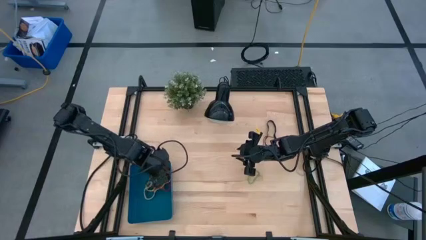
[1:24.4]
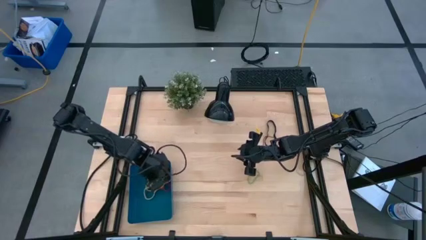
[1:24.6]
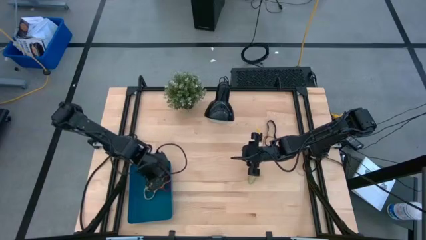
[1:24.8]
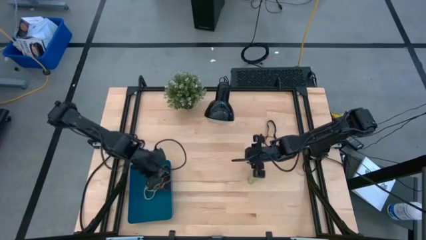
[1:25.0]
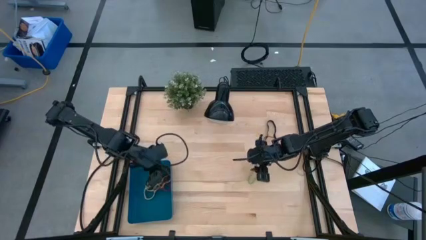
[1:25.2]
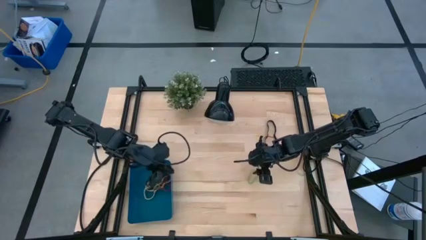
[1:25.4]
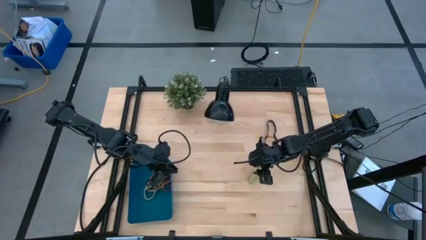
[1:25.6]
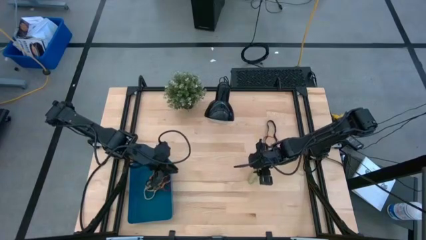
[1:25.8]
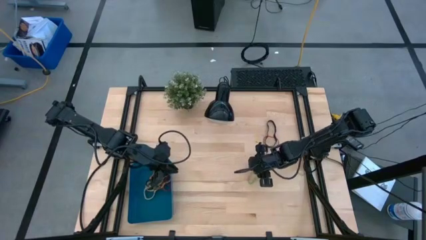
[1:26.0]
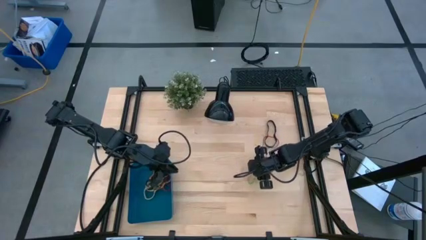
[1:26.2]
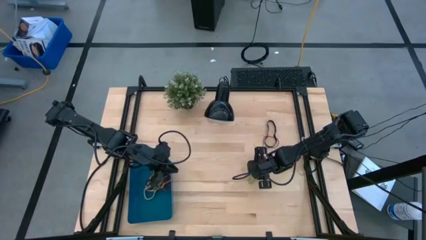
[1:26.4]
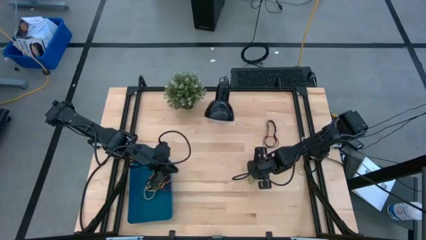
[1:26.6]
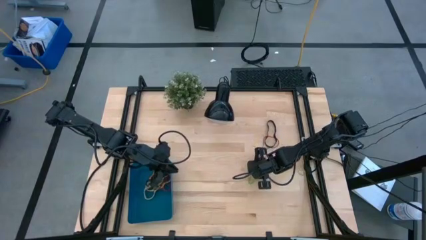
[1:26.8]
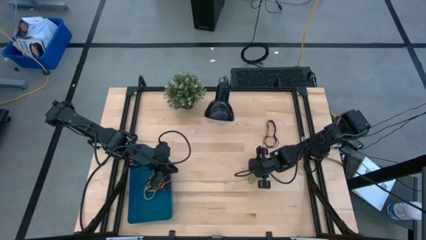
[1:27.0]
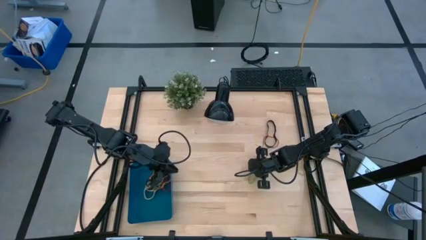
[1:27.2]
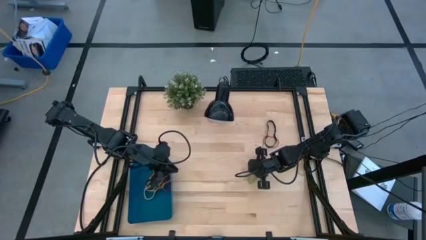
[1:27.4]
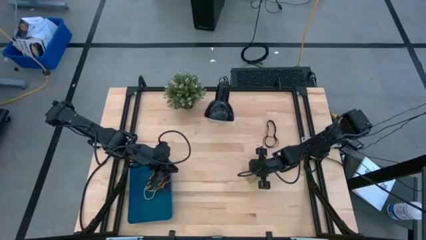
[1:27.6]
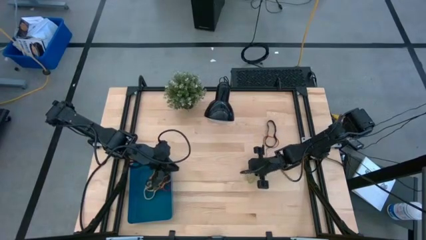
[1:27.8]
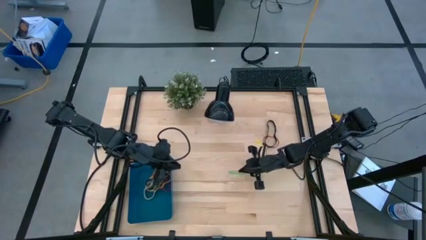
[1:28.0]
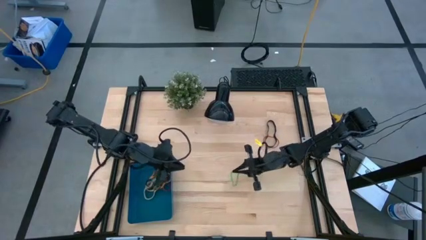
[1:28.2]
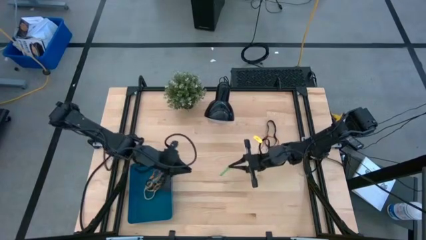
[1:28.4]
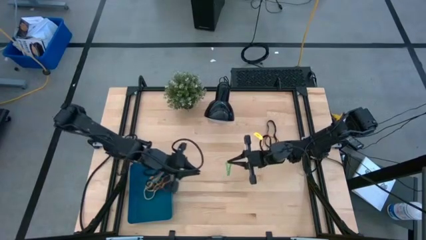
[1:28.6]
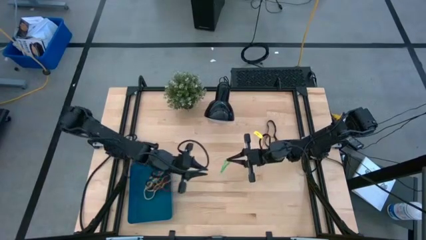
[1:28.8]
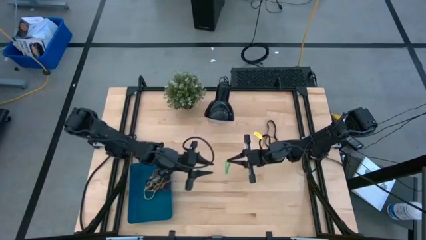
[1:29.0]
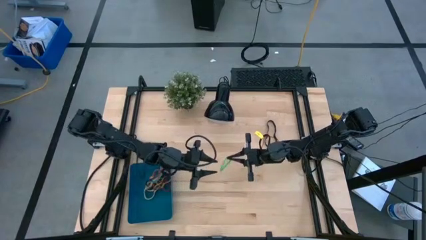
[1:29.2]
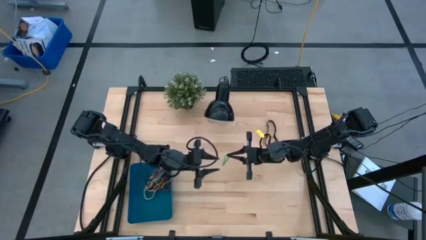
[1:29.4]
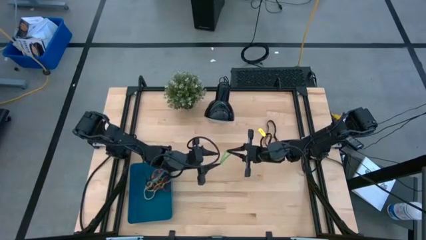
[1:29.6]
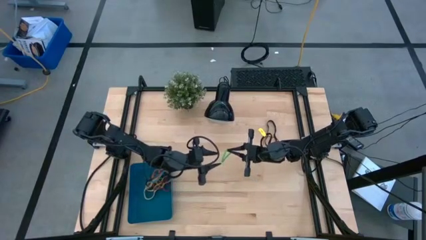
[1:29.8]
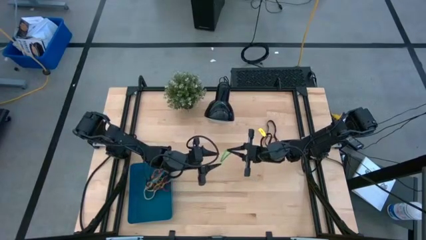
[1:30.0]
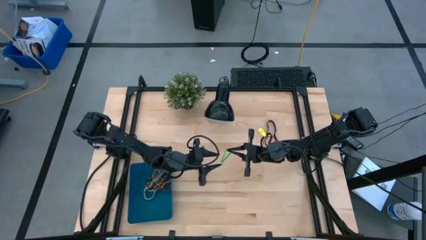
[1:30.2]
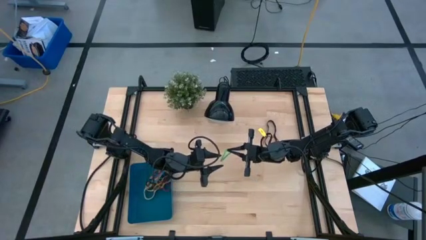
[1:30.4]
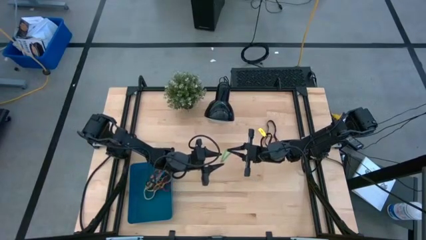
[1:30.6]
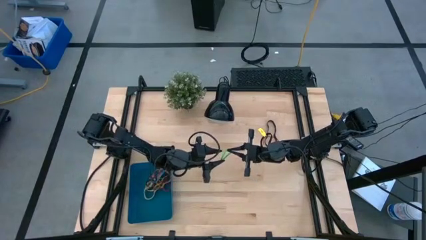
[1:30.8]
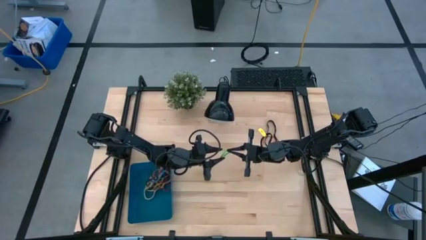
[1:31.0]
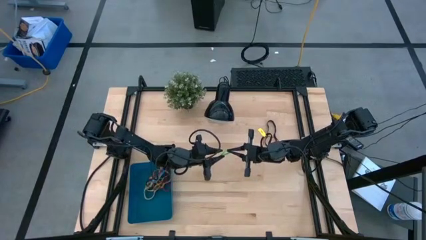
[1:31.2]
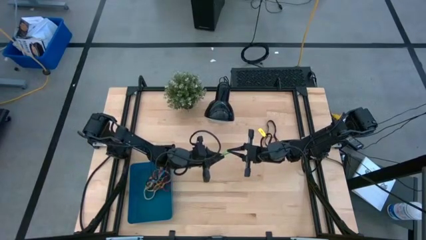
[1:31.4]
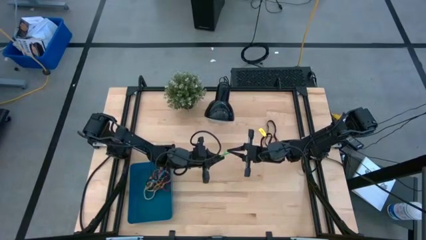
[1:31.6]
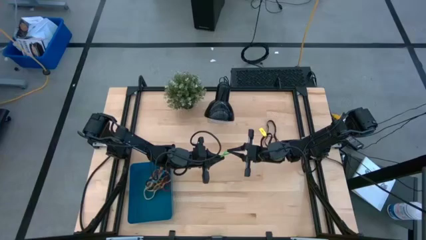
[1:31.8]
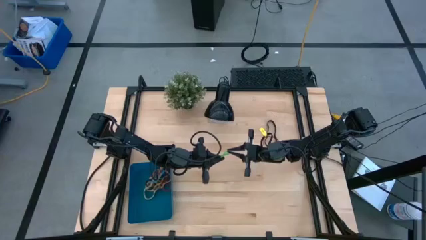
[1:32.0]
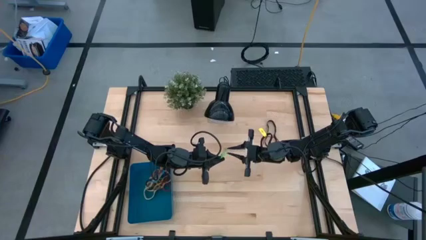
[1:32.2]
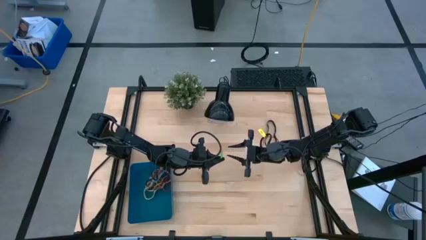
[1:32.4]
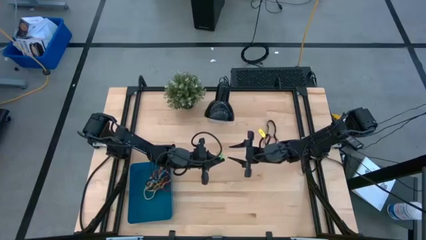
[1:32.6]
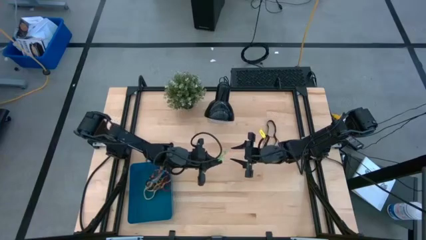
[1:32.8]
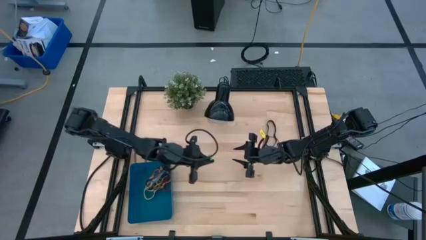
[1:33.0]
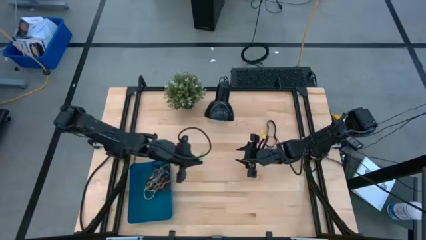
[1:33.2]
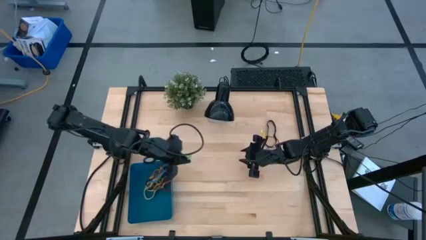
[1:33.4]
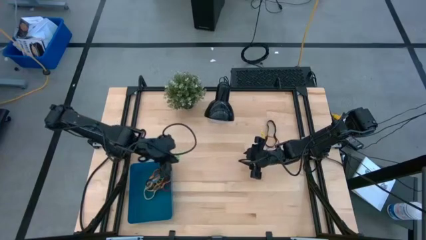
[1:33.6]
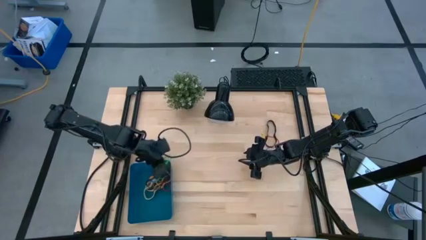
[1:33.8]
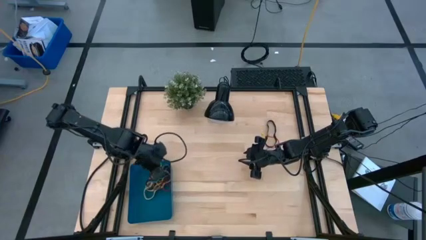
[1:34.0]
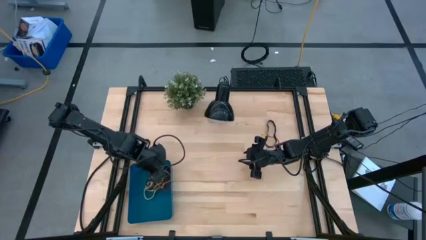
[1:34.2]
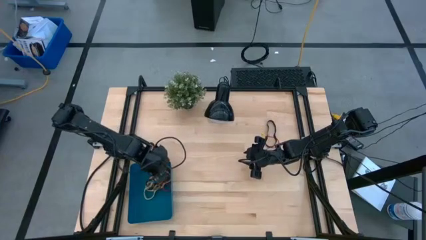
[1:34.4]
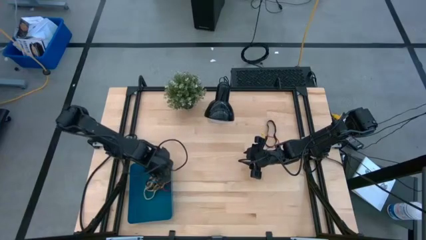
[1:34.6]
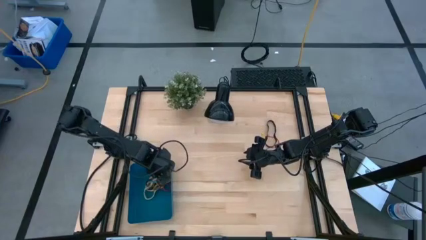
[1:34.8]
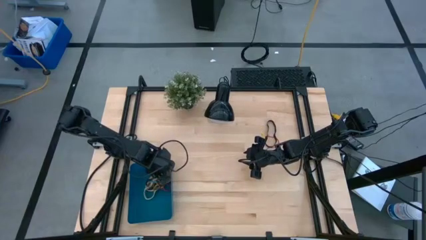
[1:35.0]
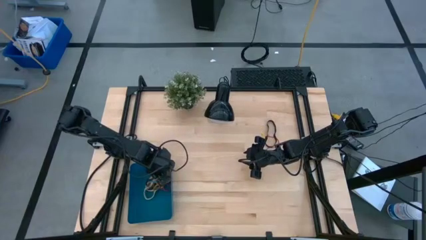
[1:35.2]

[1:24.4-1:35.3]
Task: Pick and place rubber bands into bin
Put the green rubber band into the blue bin
